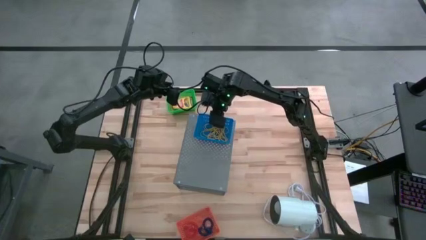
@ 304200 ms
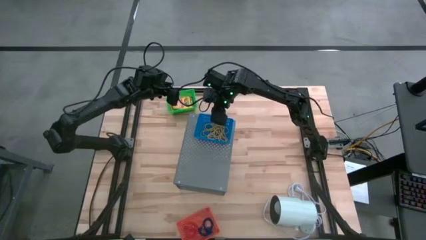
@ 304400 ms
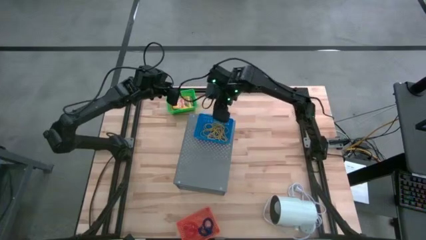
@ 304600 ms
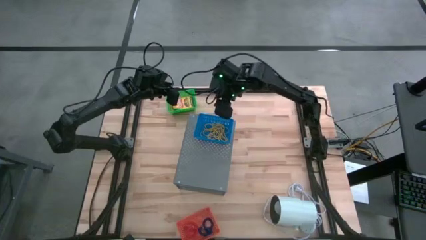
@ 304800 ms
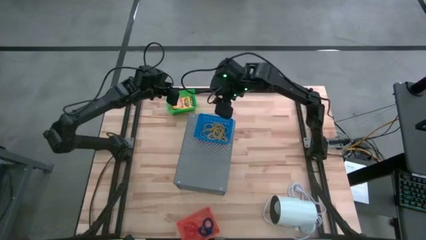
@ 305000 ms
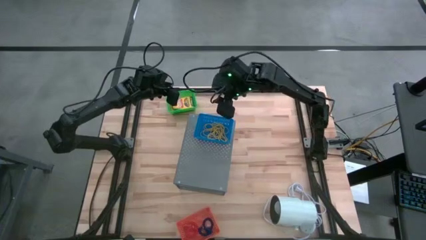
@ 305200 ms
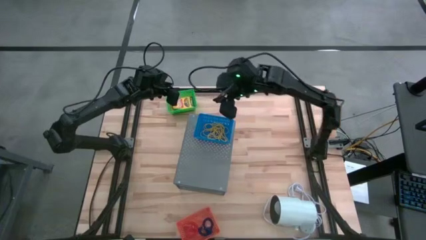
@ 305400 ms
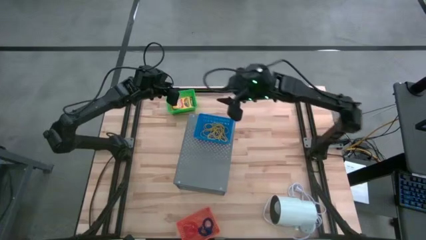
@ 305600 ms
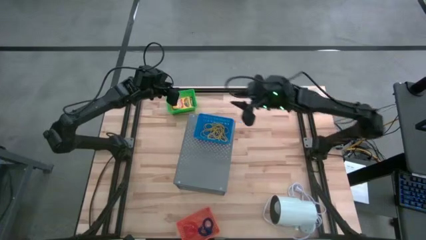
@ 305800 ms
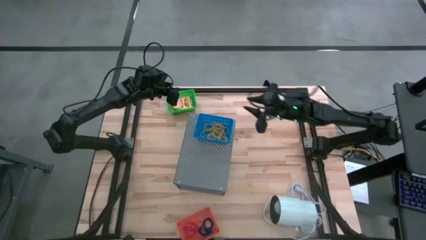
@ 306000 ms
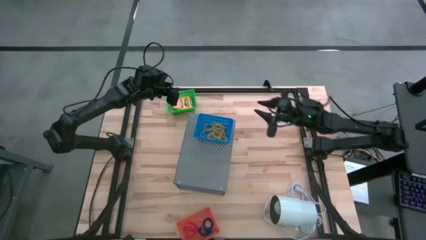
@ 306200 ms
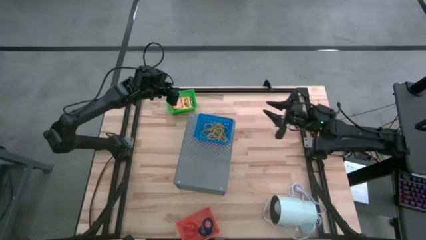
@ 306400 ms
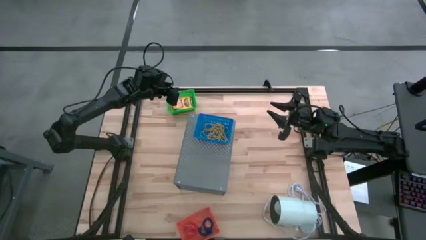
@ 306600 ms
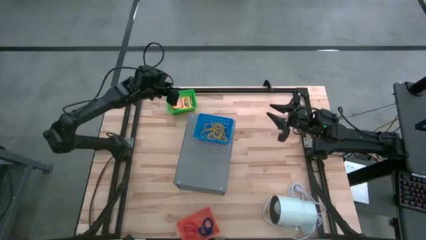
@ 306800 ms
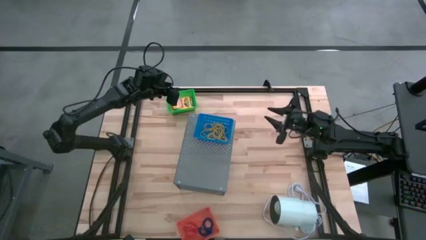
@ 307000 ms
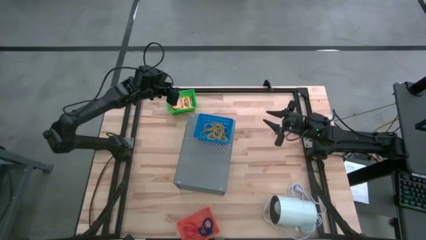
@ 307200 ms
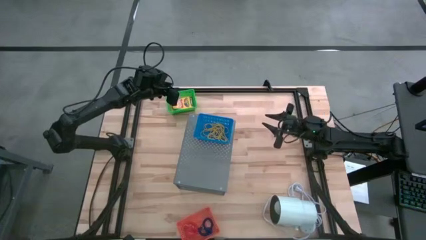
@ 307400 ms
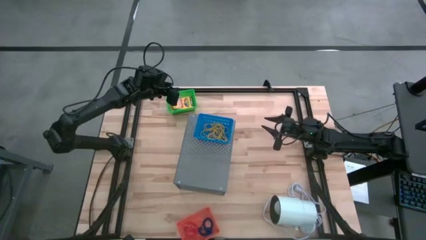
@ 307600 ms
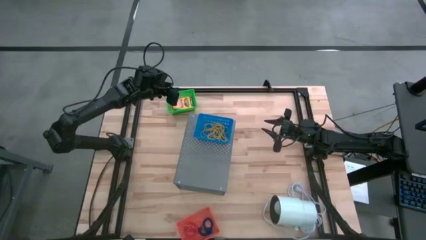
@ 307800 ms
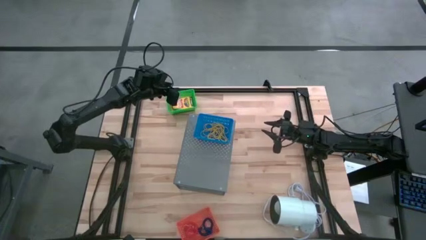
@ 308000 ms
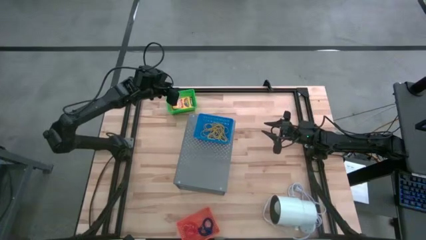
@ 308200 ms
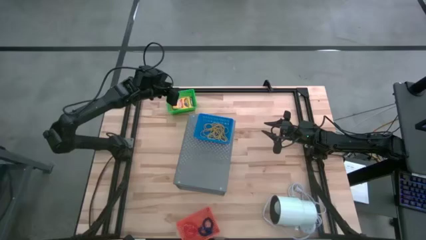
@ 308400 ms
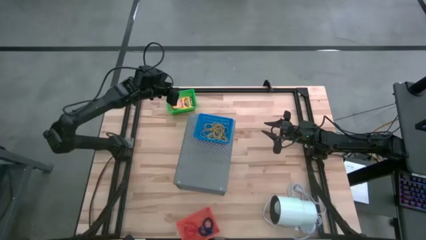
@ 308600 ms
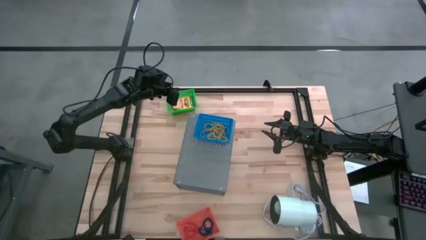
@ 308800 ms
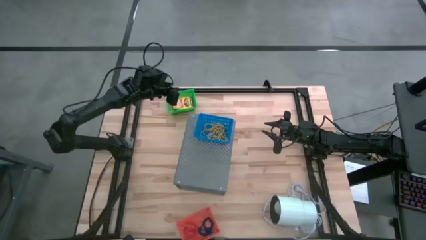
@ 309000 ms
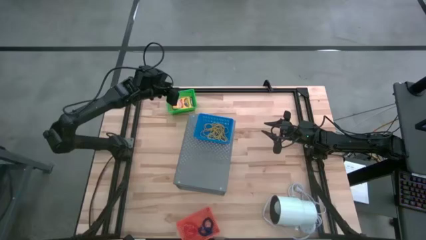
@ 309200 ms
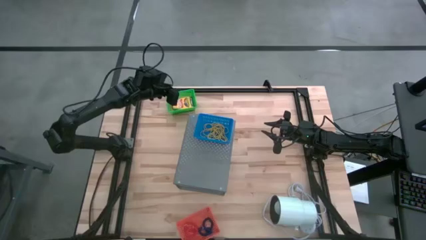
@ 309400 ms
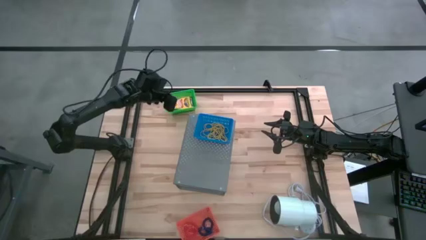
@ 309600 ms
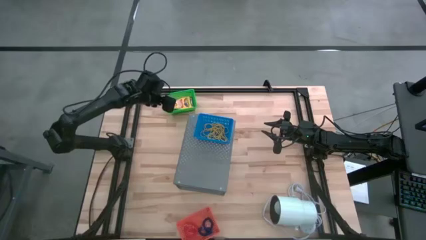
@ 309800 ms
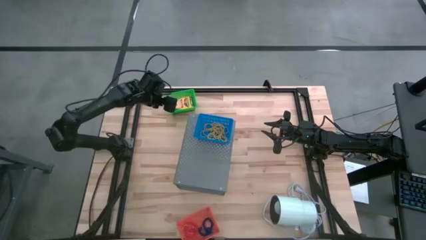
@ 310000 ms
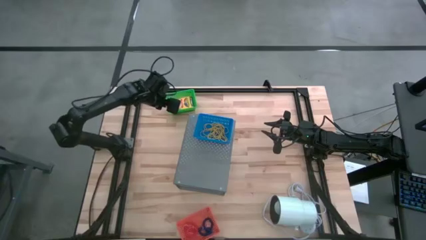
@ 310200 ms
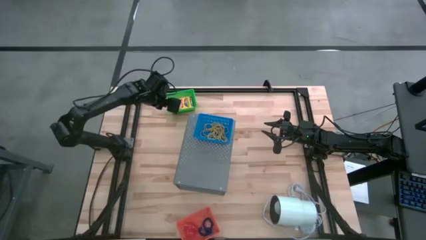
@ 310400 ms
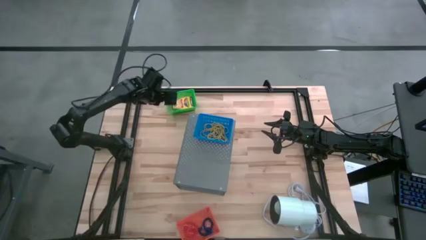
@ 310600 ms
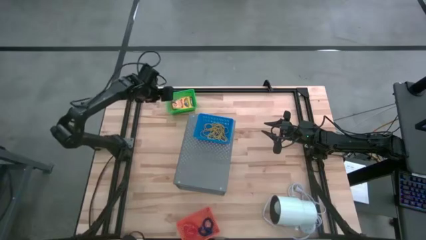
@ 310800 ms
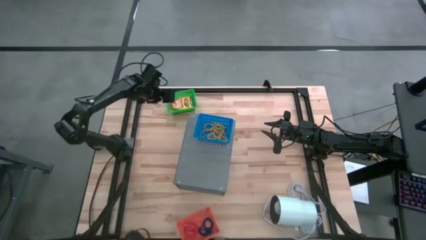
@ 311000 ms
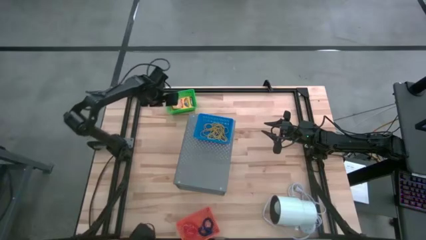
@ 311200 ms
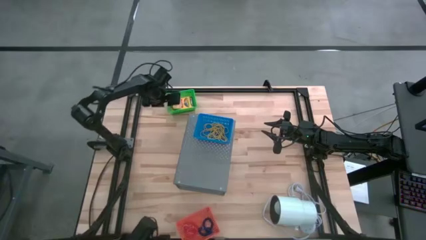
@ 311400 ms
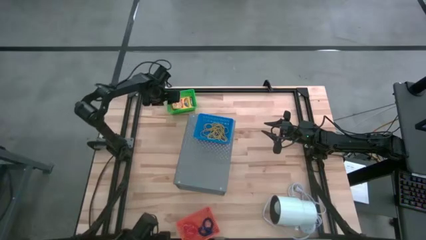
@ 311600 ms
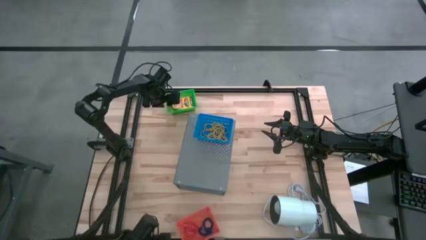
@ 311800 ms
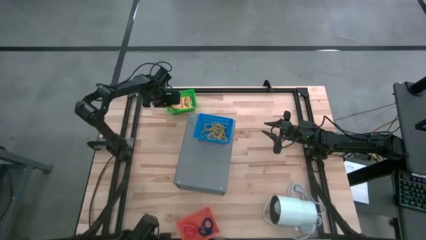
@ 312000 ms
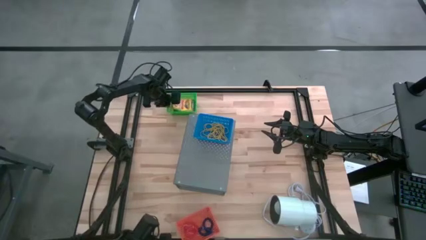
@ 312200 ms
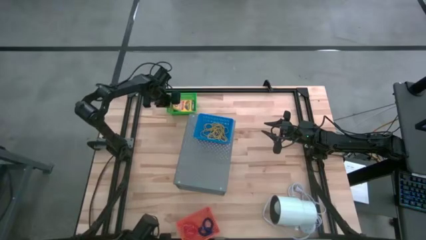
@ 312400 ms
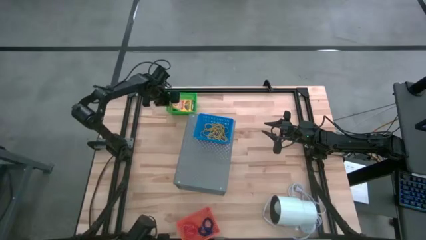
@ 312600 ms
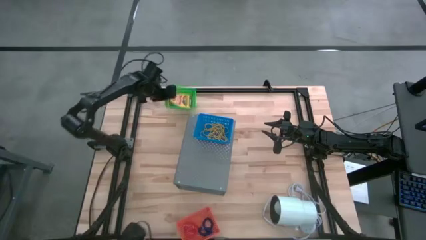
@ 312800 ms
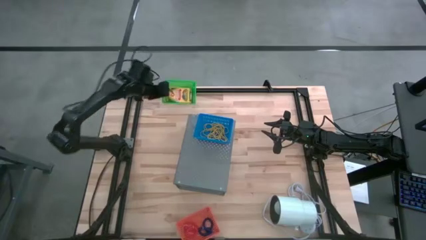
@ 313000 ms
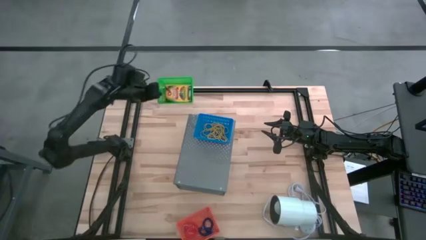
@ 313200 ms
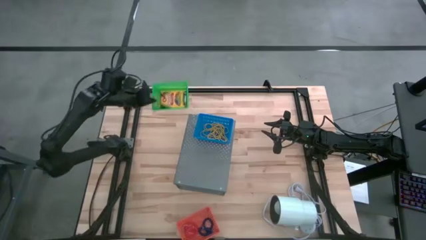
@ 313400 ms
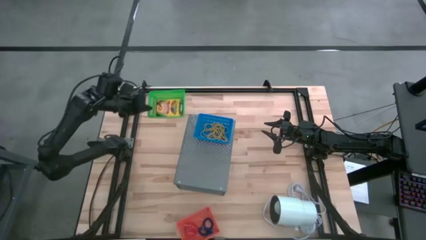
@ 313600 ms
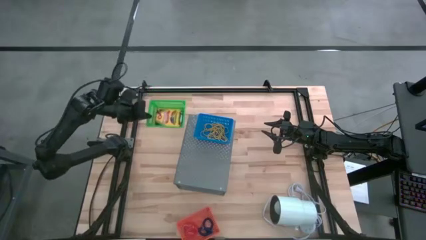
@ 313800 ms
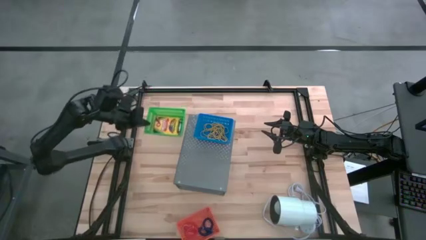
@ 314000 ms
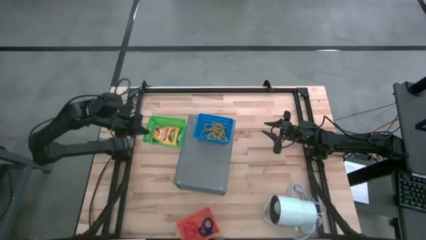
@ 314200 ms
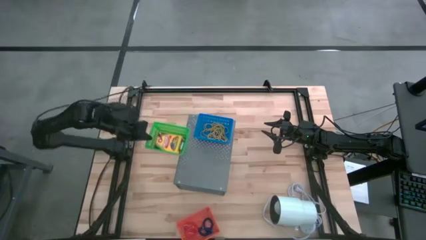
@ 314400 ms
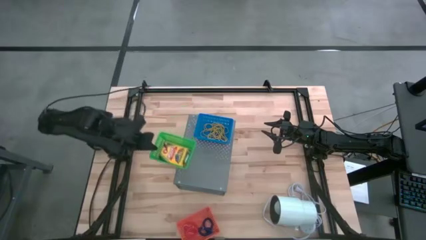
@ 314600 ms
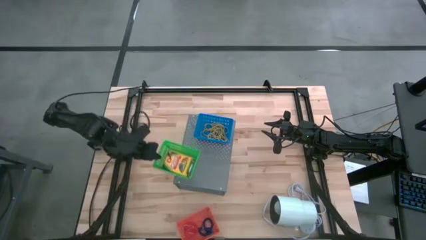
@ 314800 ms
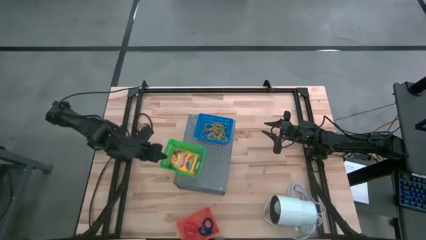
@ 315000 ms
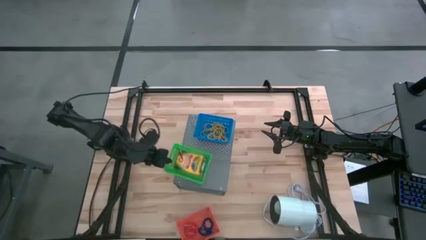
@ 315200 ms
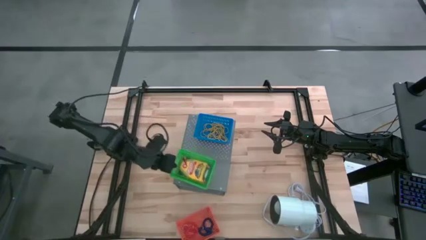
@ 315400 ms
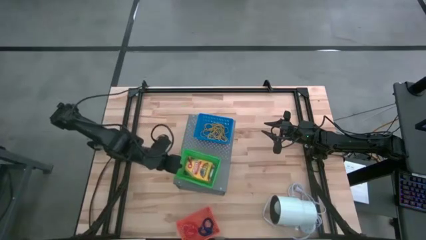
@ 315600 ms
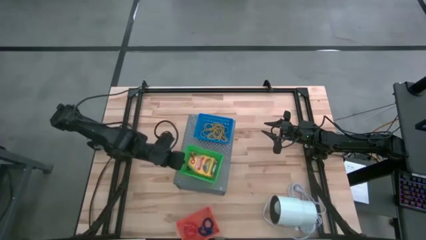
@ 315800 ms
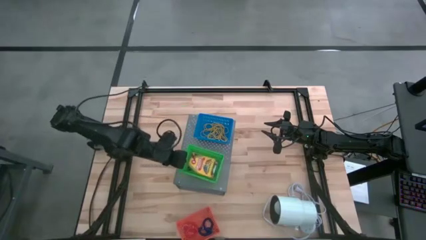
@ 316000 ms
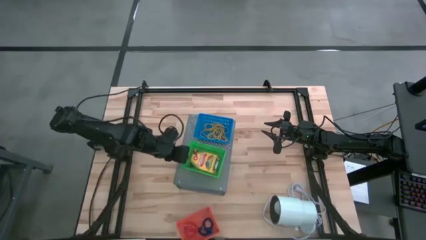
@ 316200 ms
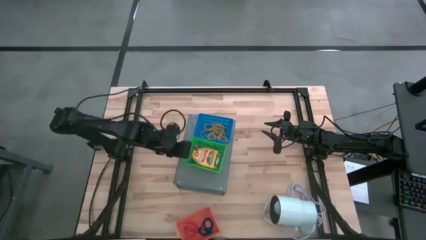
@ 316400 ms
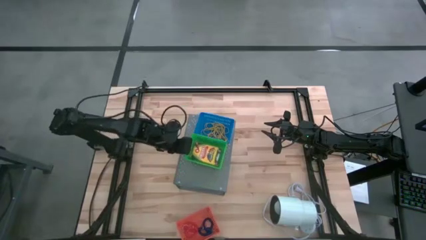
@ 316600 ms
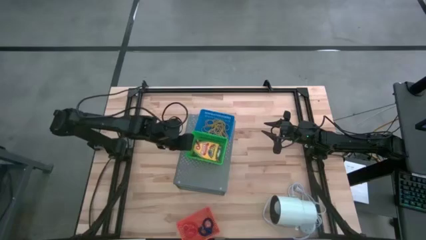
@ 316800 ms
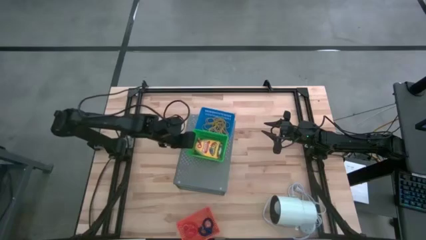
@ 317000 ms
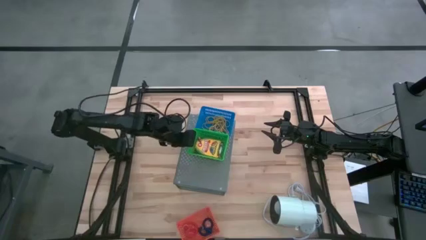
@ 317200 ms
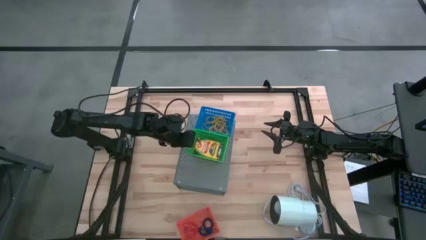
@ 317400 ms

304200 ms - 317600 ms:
Task: Pick & Place Office Desk Supplies
Put the green basket on the shelf

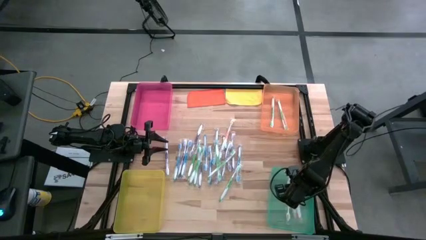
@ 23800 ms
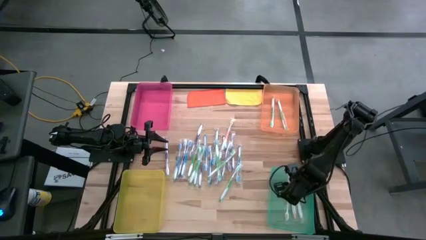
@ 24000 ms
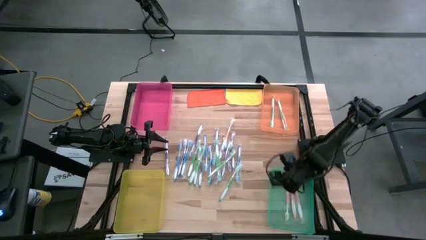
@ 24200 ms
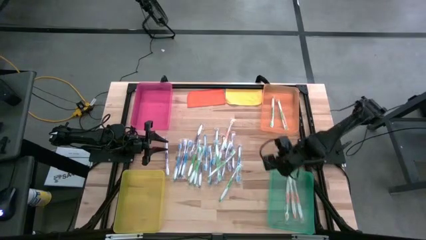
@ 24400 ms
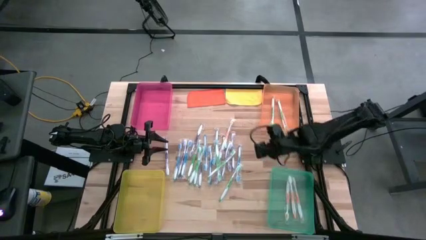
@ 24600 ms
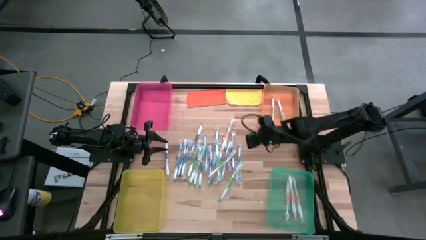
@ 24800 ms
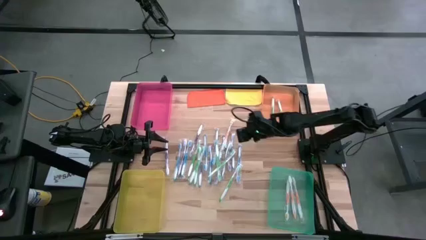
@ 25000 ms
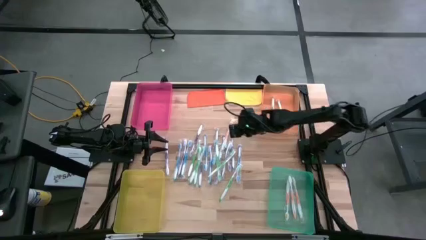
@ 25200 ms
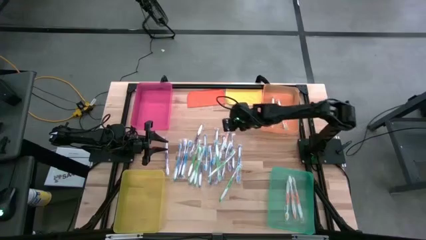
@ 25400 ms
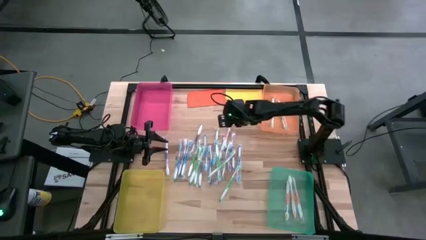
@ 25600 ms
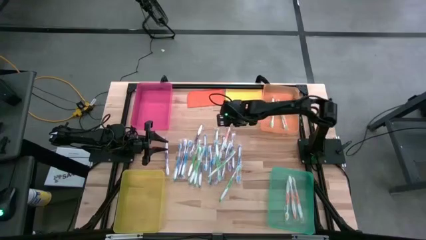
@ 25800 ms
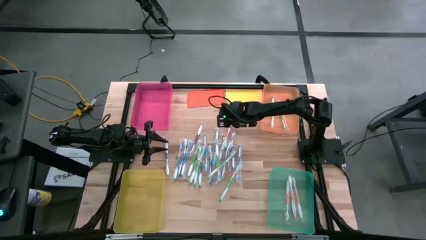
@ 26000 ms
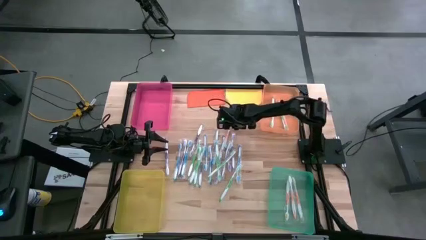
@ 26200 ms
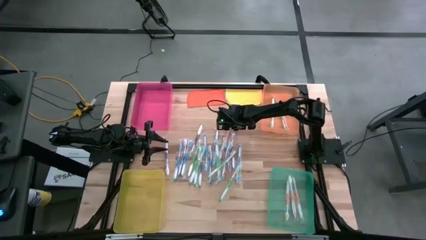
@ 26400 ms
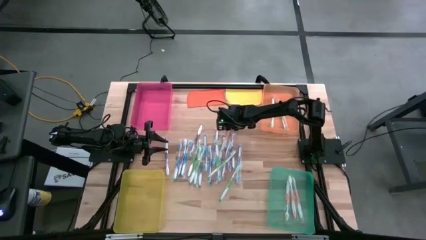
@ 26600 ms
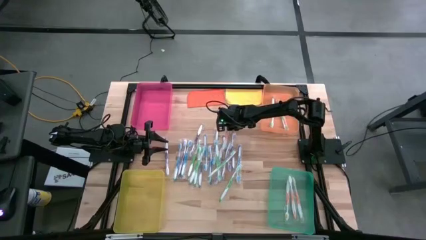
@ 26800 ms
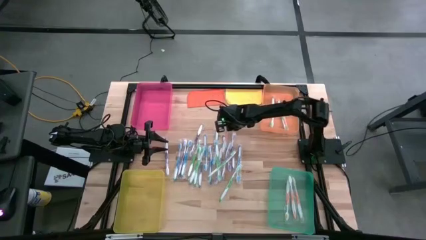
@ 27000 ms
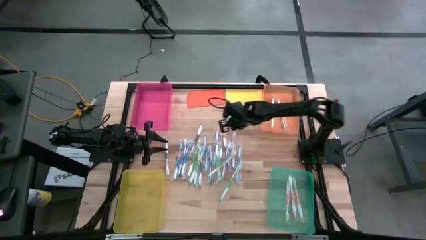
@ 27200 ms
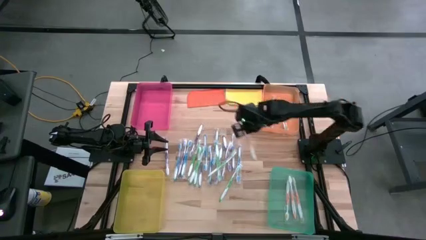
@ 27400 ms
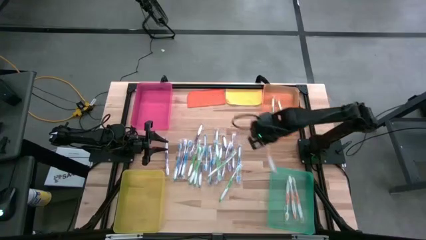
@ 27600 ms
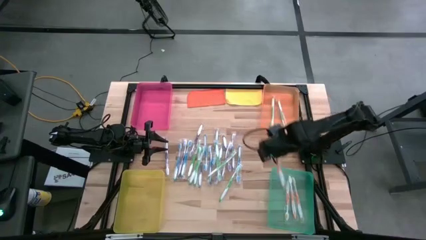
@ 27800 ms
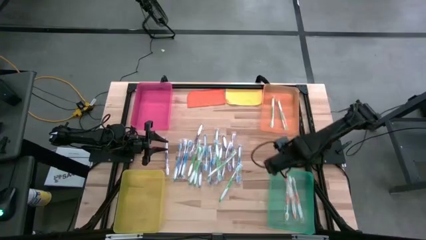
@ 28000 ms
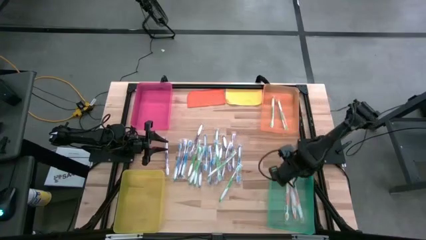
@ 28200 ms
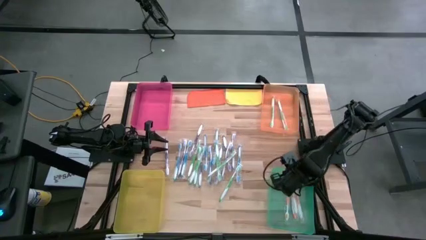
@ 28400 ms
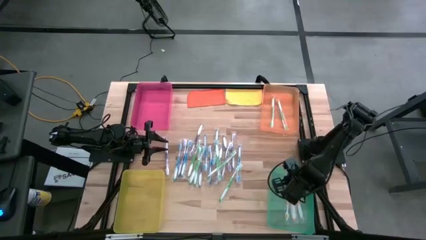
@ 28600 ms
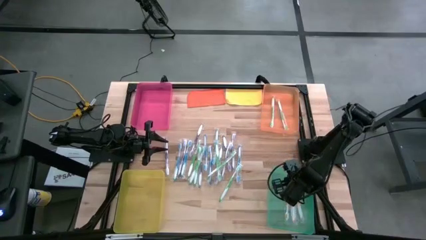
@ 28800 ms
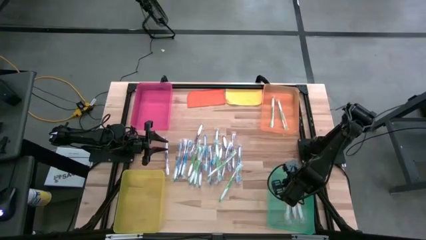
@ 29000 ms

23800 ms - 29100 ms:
Task: Pick & Place Toothbrushes
Put the orange toothbrush into the green bin
